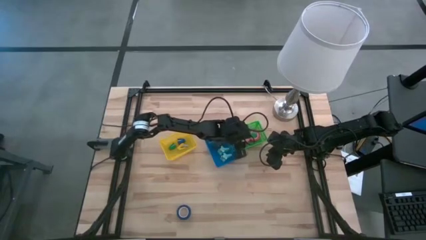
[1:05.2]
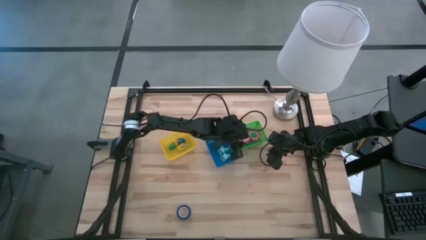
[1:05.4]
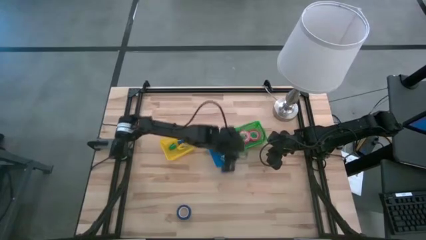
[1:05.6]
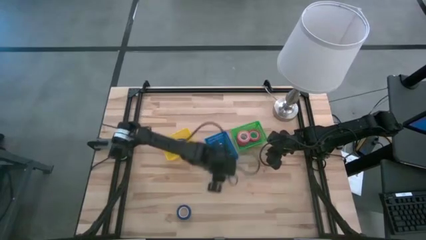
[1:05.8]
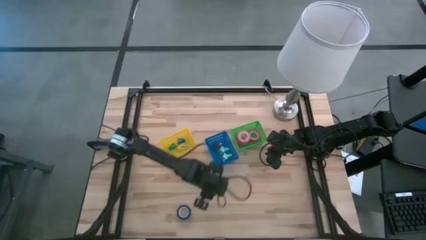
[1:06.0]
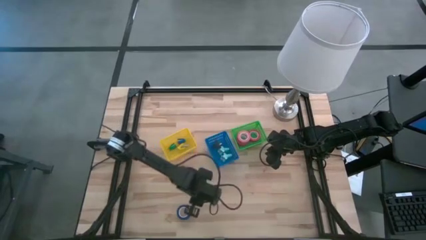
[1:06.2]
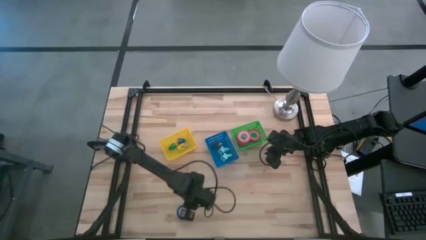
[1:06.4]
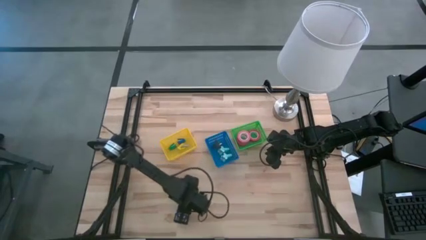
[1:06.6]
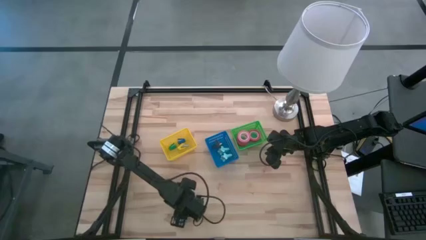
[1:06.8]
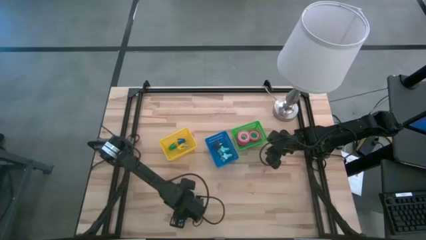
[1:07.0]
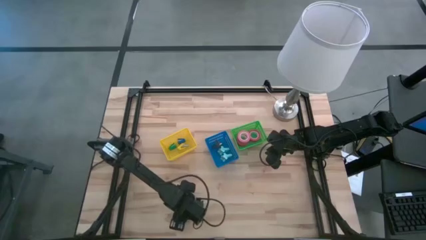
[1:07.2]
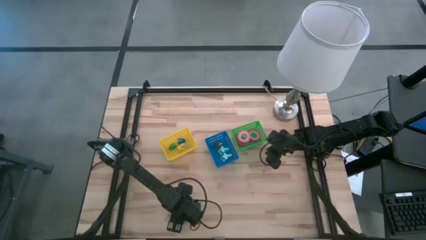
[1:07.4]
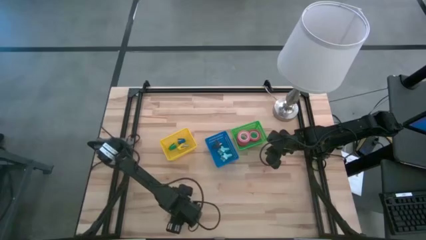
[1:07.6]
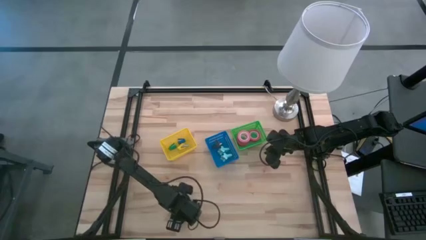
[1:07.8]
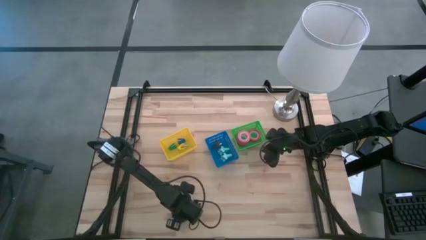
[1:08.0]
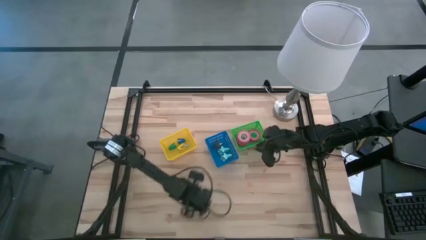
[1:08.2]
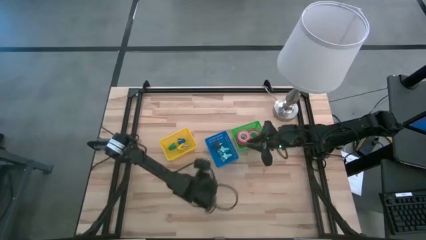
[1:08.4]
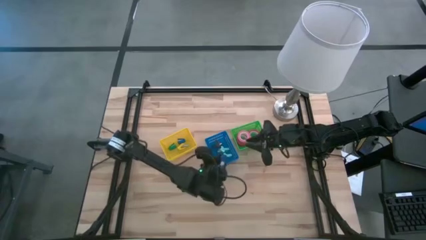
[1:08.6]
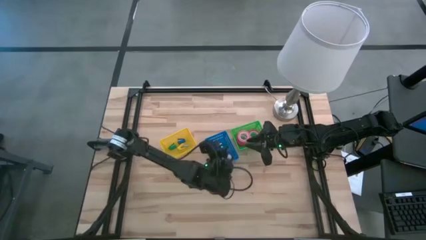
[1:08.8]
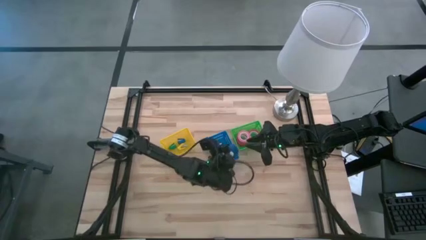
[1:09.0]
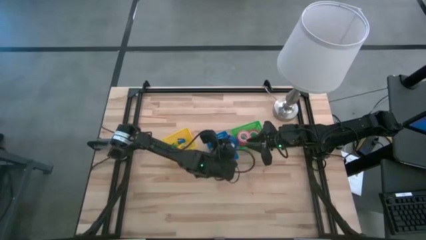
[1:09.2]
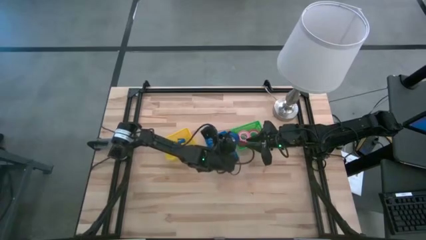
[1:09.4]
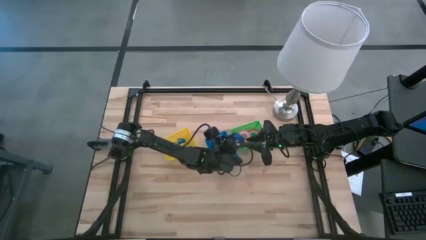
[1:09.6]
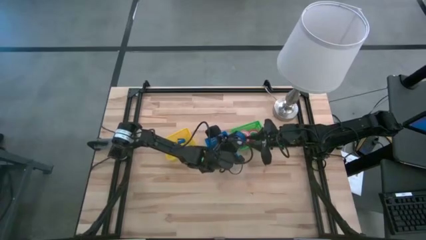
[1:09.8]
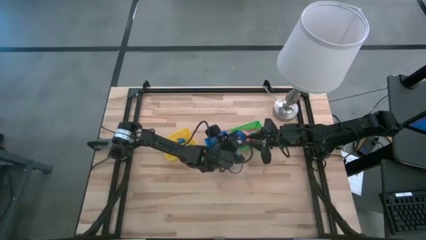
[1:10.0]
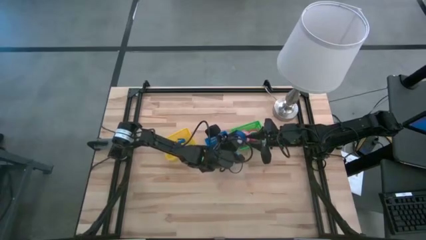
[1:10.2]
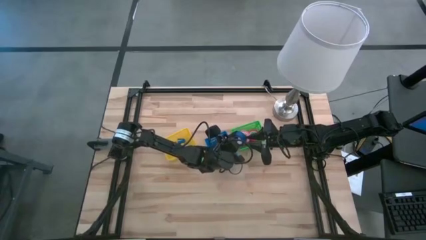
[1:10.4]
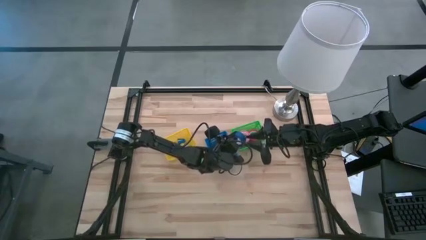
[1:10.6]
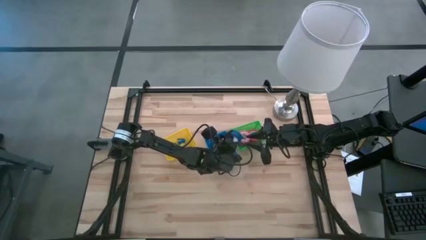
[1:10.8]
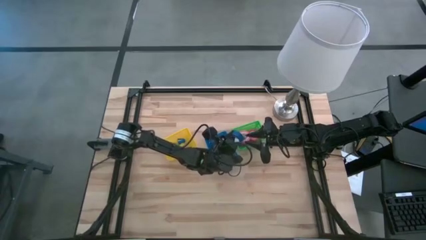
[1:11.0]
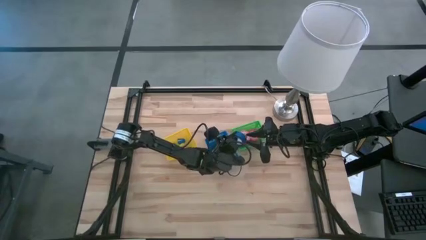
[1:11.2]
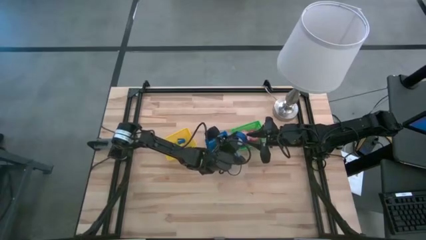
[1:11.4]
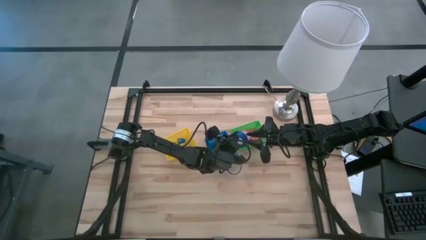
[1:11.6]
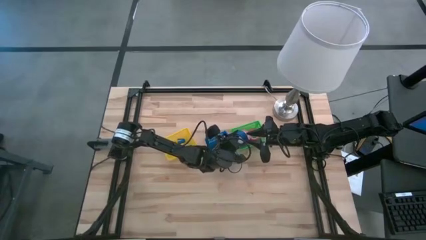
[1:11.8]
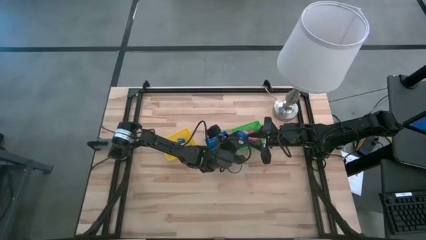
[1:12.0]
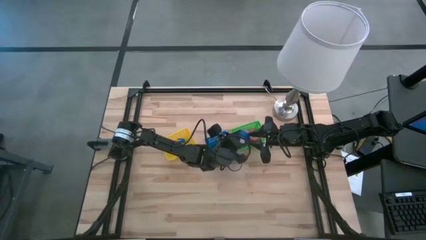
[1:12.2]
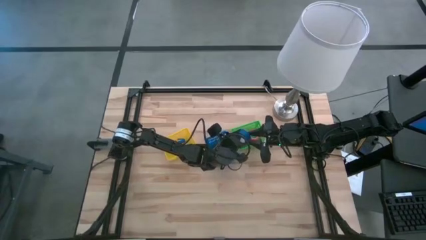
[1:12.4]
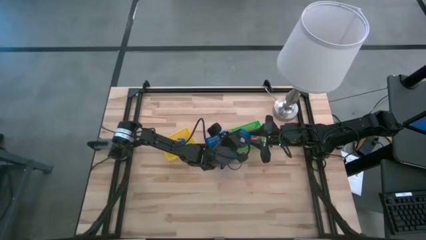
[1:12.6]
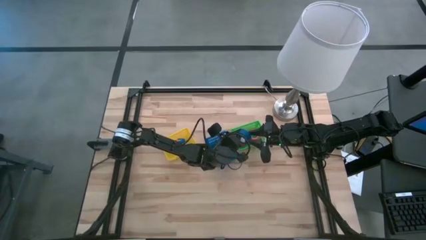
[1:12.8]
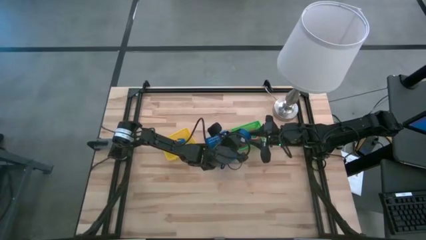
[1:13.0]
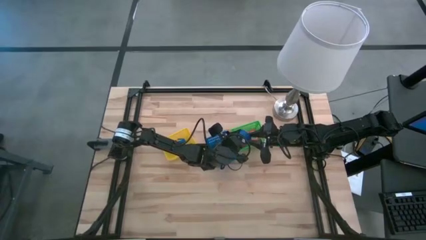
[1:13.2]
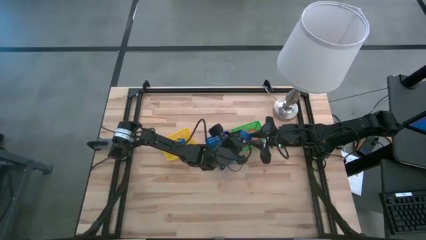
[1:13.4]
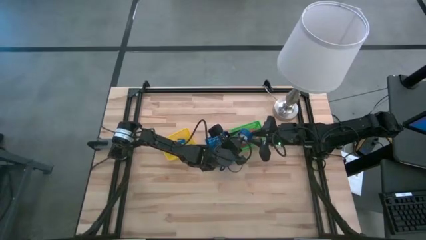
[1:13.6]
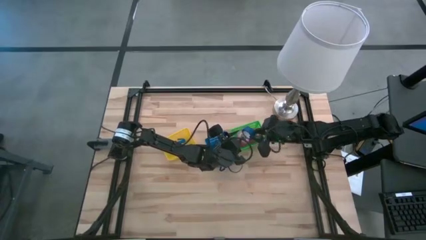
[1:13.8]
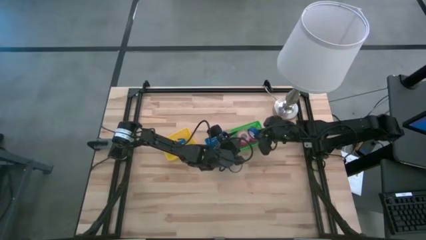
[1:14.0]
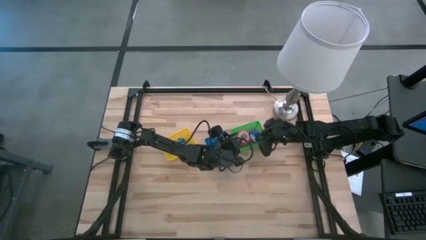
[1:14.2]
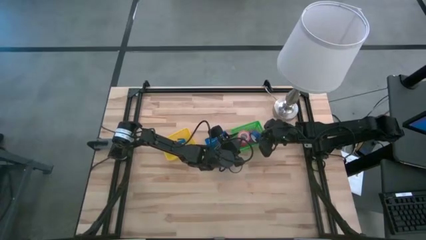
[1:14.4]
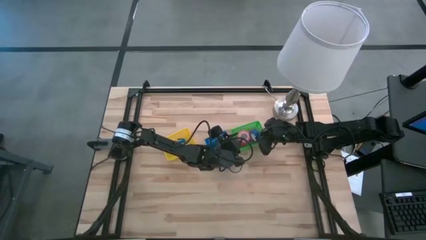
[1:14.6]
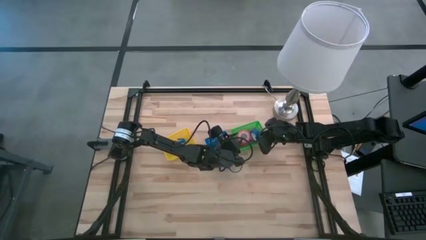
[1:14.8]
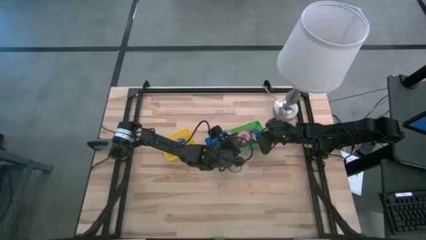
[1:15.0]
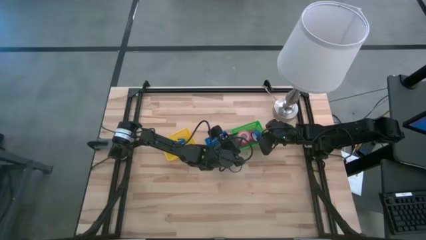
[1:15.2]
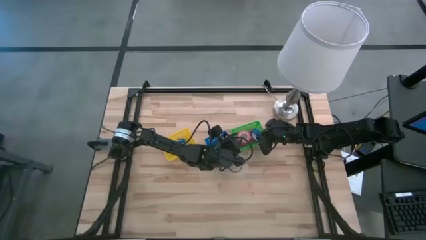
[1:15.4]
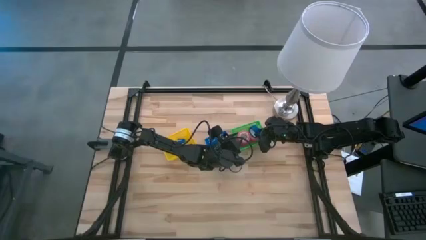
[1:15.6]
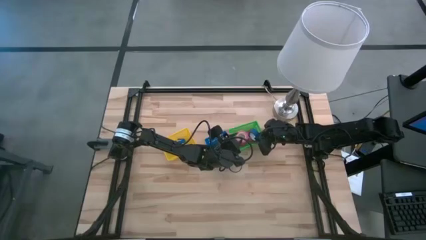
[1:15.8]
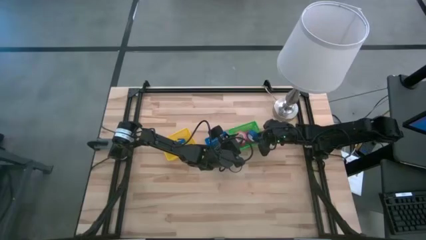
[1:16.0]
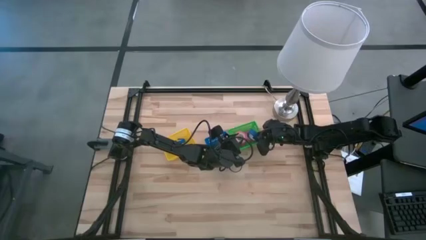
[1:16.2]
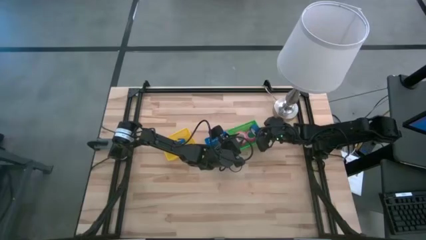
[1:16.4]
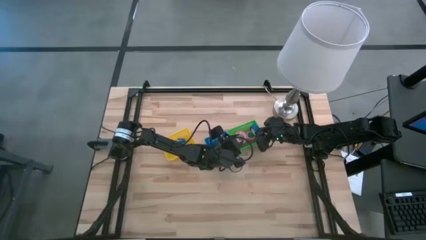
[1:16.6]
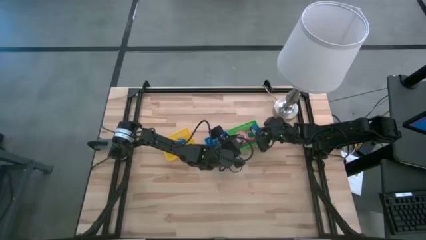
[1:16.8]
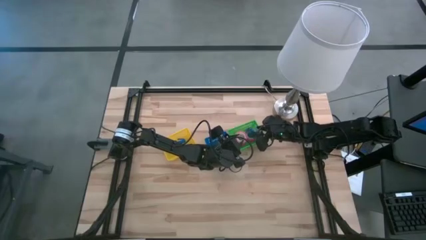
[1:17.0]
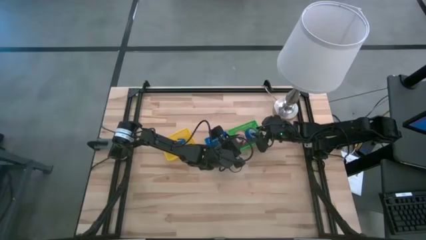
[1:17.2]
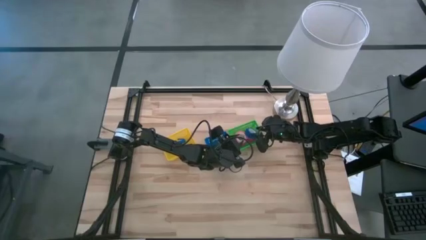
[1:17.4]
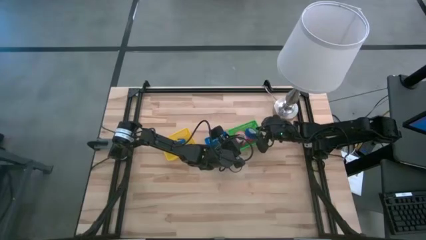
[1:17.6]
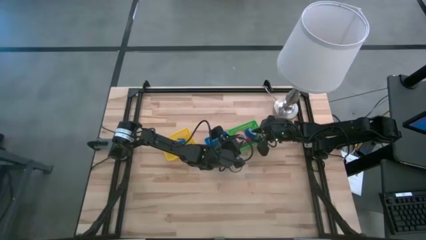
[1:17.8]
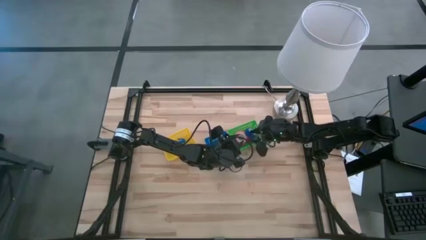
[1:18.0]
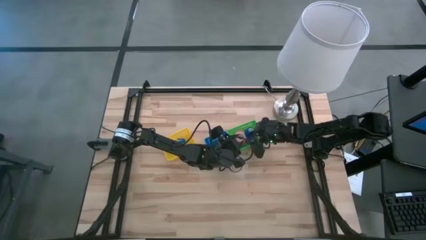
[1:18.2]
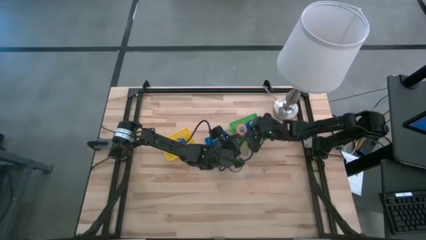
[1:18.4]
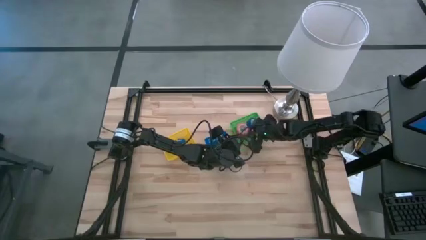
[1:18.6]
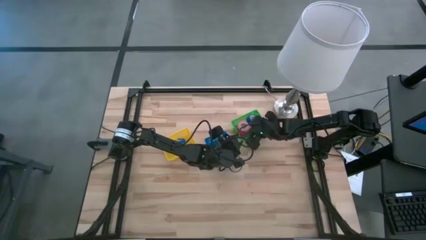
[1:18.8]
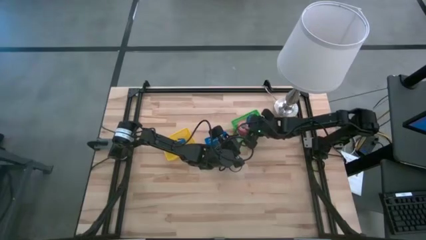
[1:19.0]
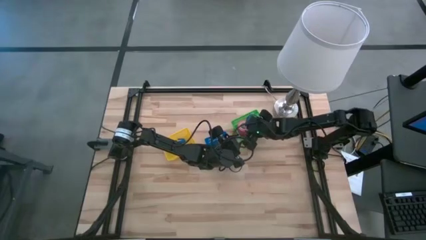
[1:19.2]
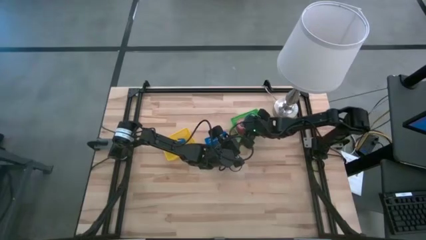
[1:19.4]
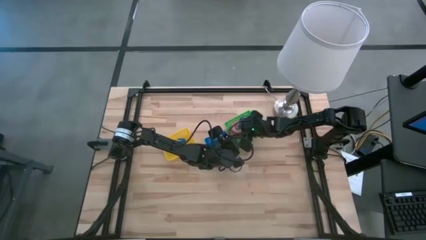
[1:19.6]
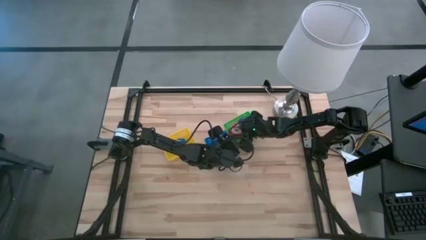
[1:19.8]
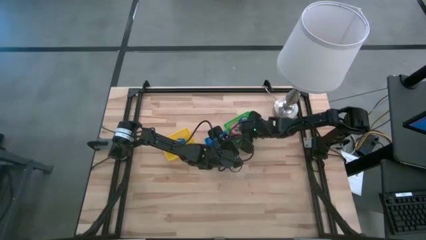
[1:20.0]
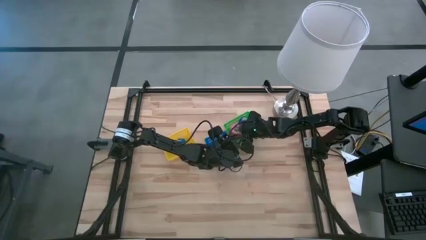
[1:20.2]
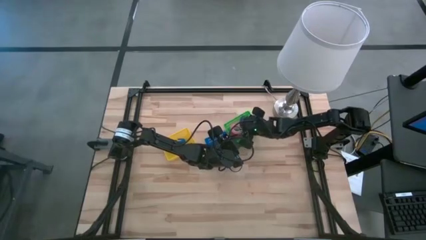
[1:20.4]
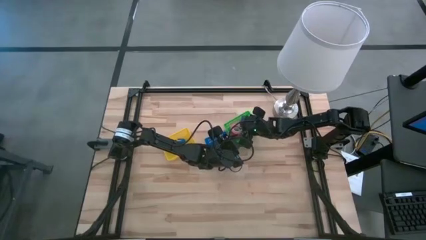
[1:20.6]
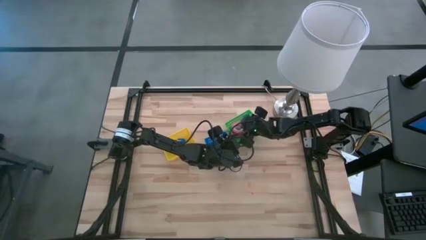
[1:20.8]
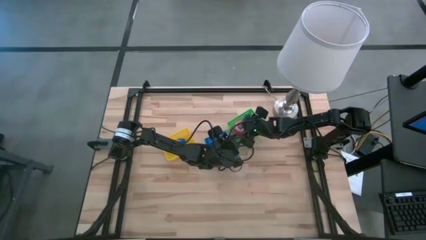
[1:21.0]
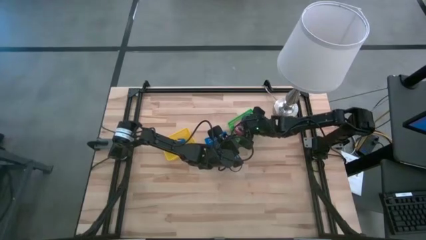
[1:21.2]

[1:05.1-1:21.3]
Task: Pick and place Stapler, Stapler remover, tape
Put the blue tape into the green bin
